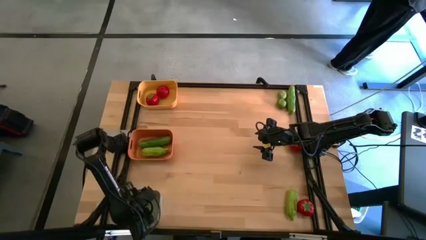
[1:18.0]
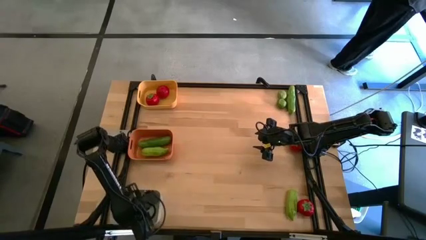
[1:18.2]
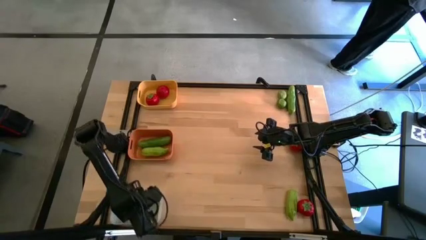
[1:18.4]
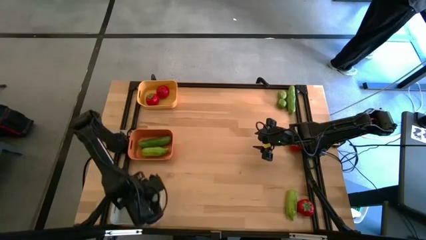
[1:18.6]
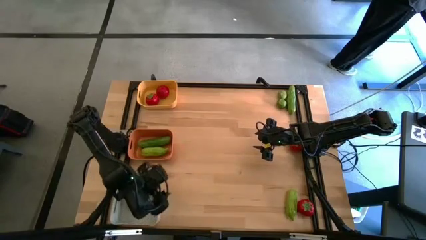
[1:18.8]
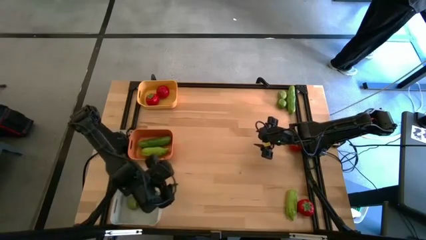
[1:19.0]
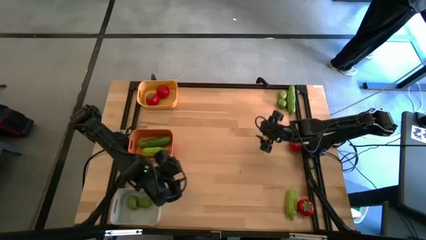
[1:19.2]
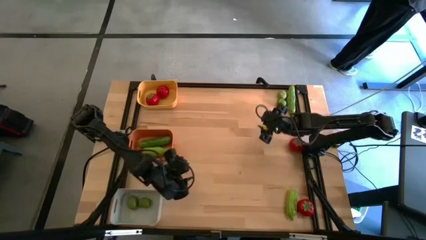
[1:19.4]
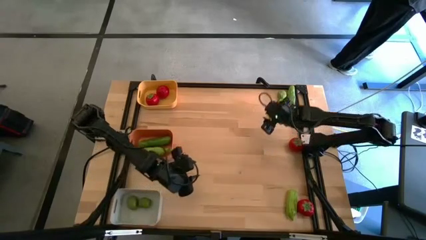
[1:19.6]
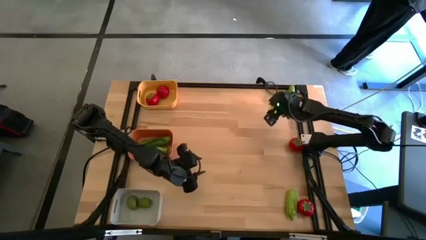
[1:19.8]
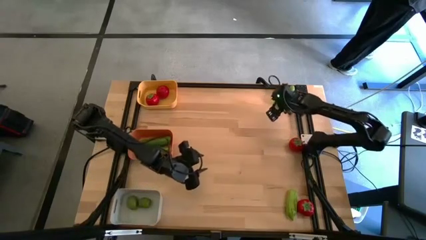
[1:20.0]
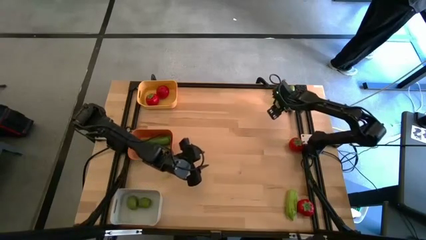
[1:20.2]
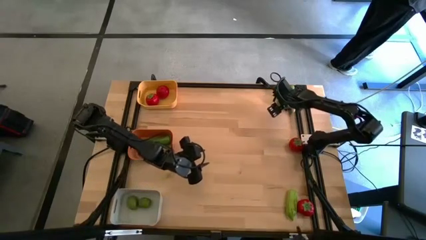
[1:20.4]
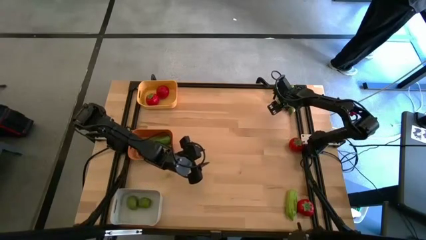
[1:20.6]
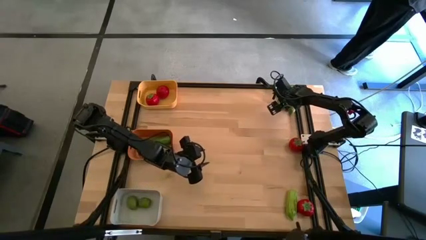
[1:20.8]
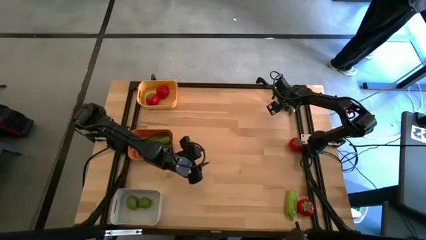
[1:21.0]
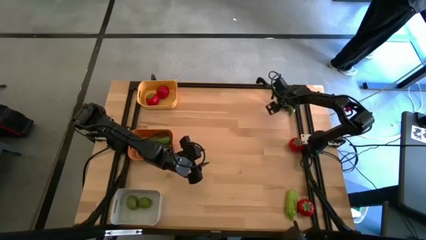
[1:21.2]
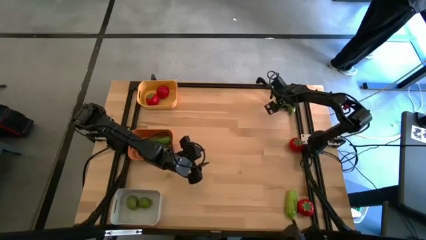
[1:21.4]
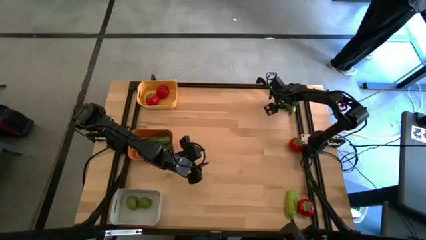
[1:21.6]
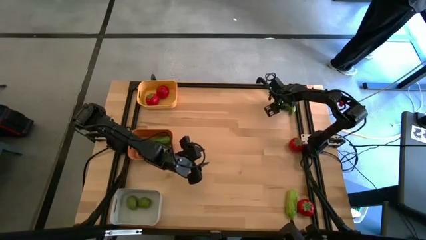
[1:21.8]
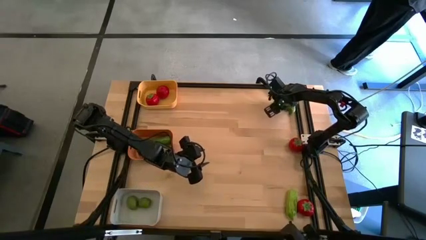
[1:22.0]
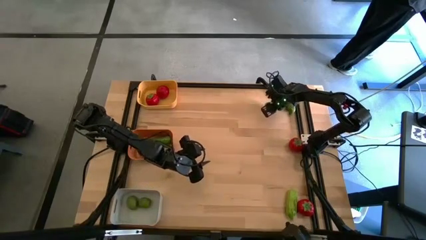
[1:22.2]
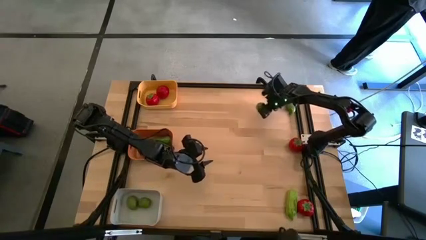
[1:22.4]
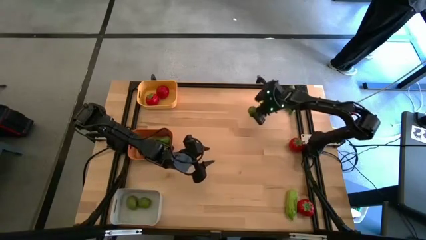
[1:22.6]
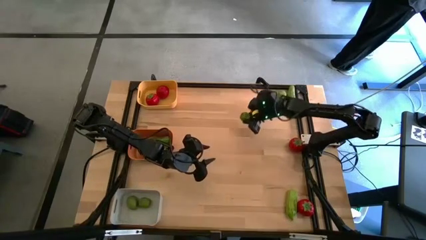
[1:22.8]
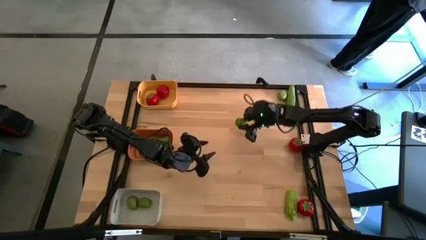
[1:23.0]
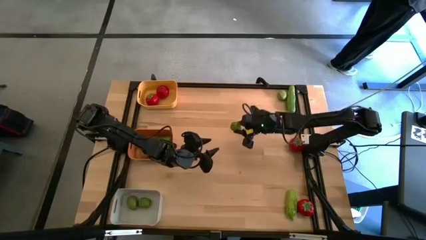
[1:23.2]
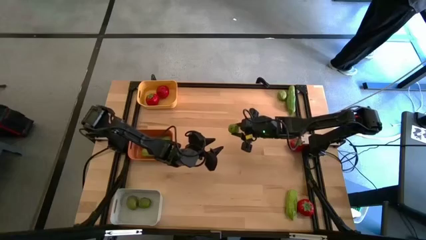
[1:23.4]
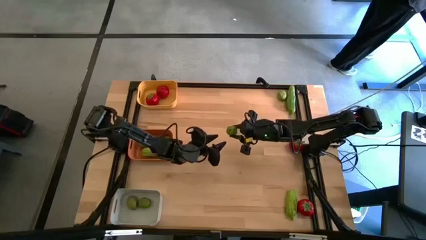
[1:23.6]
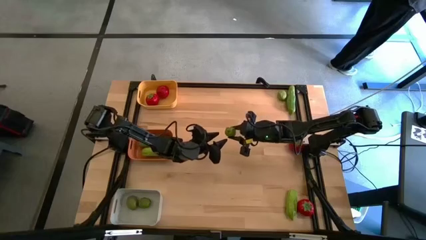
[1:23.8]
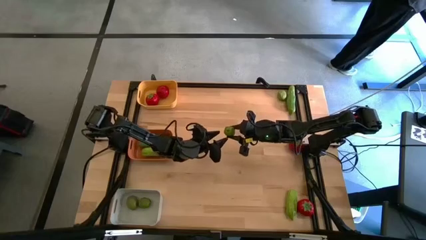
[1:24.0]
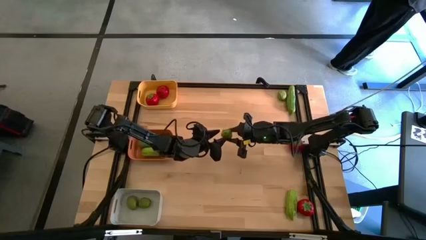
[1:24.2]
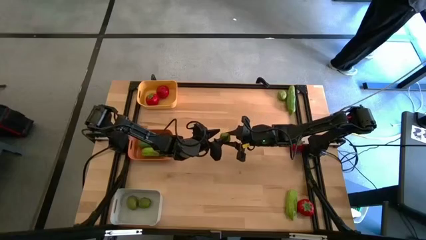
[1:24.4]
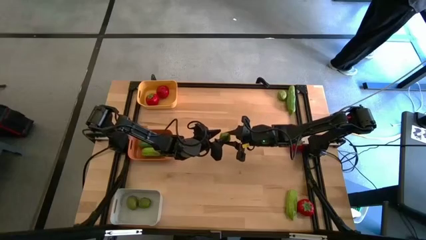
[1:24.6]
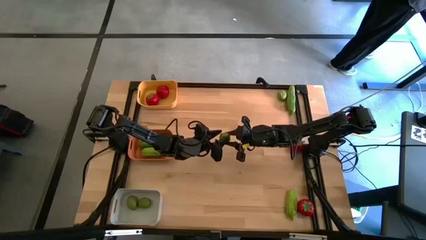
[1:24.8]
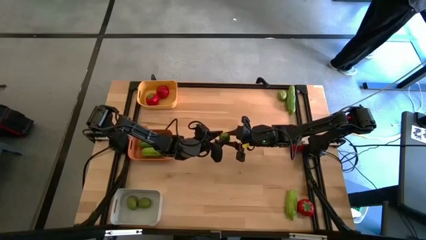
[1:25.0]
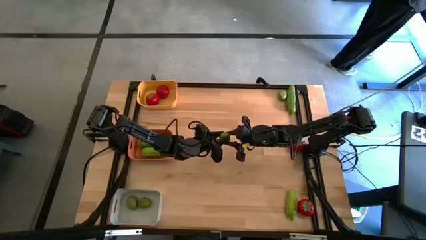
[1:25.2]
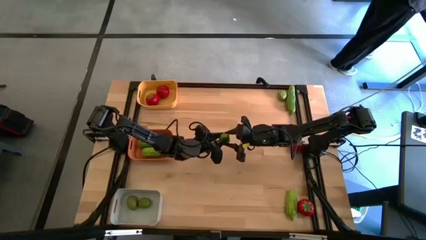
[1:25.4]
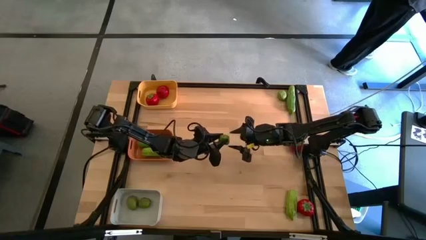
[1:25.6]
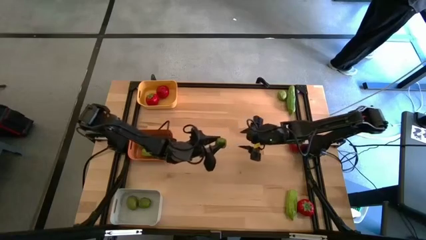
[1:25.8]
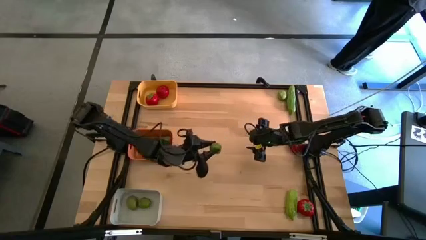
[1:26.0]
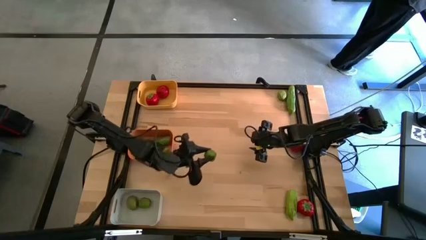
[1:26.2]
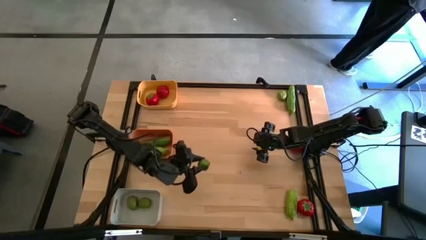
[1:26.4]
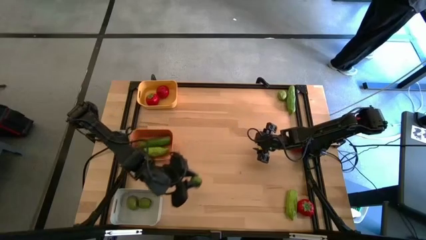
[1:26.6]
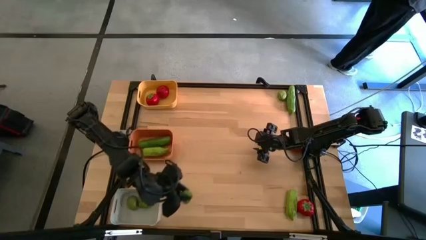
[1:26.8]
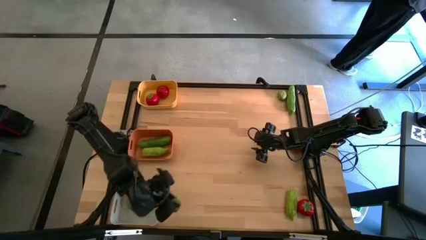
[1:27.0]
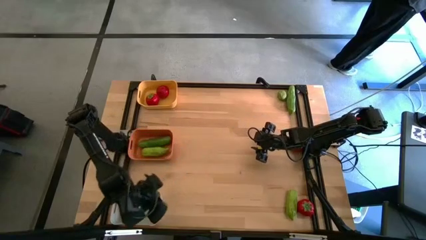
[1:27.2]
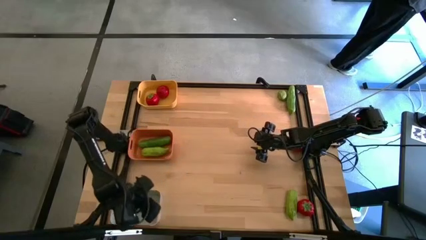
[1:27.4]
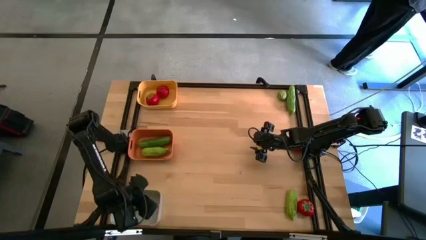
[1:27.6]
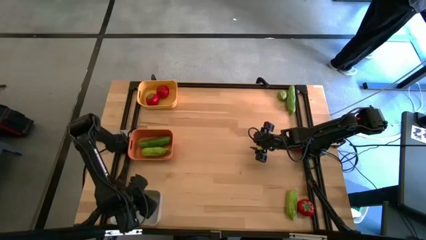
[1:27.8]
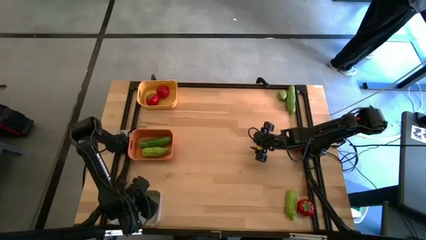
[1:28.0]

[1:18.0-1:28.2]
Task: Sort produce into baskets
Put the lime into the gray bin

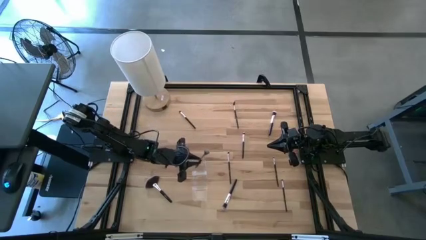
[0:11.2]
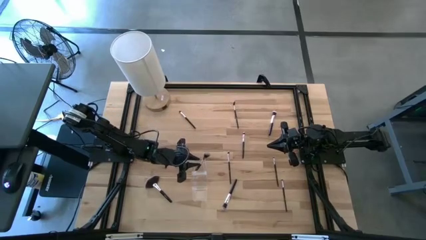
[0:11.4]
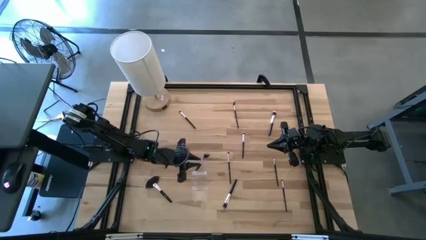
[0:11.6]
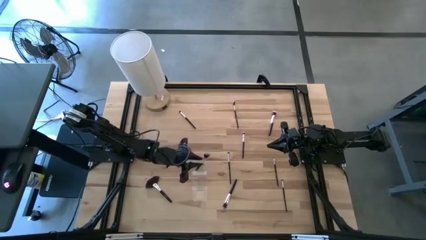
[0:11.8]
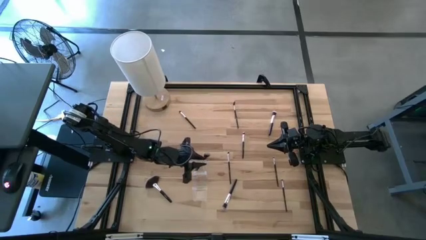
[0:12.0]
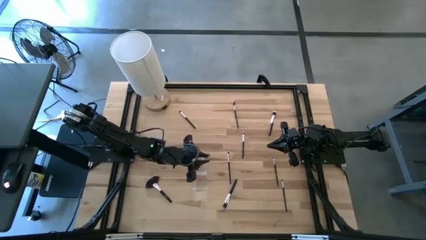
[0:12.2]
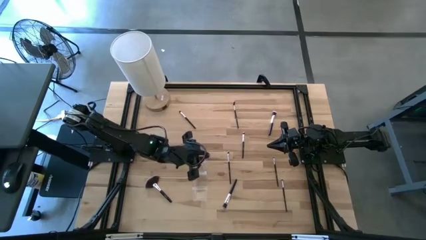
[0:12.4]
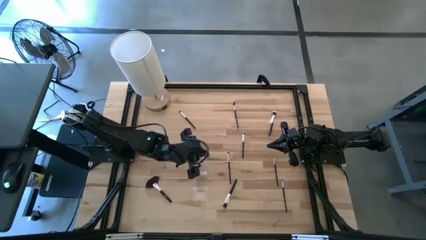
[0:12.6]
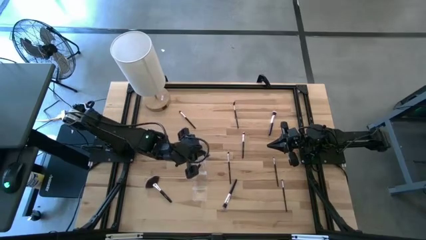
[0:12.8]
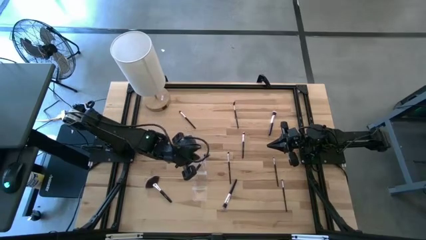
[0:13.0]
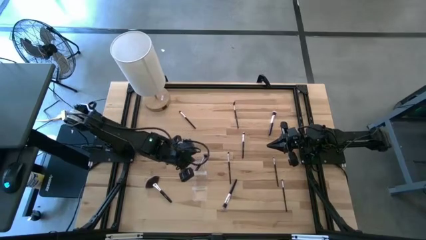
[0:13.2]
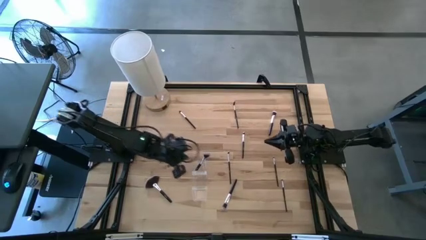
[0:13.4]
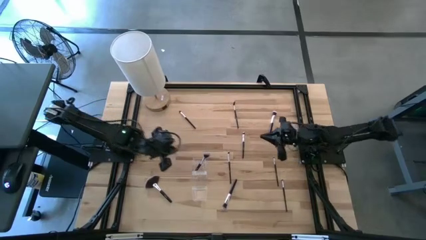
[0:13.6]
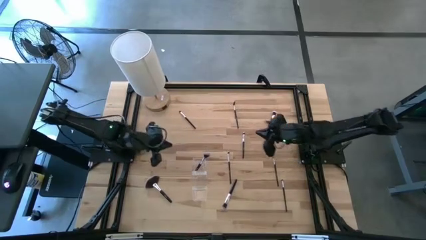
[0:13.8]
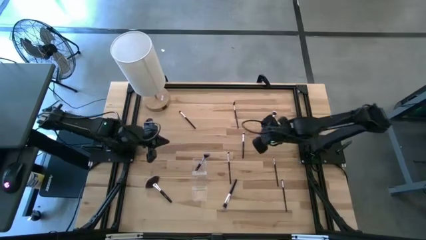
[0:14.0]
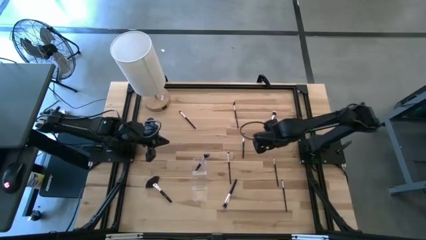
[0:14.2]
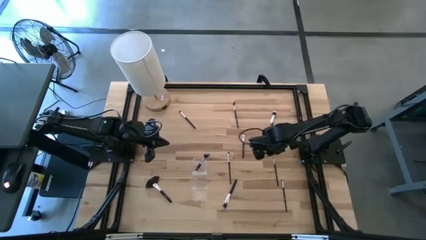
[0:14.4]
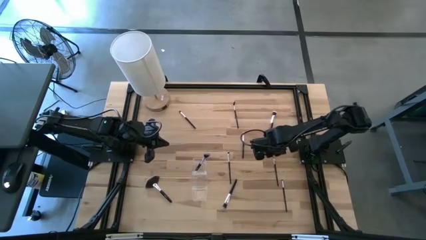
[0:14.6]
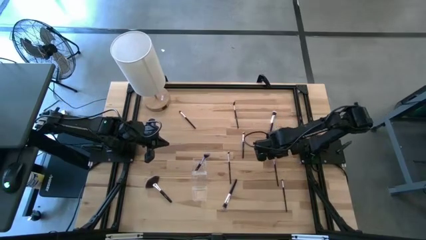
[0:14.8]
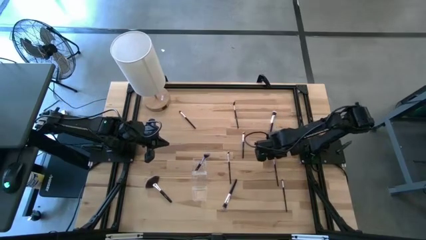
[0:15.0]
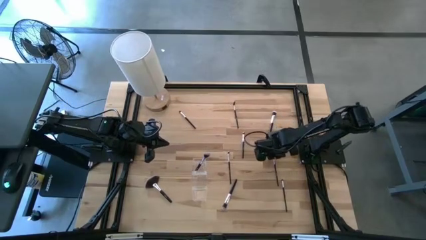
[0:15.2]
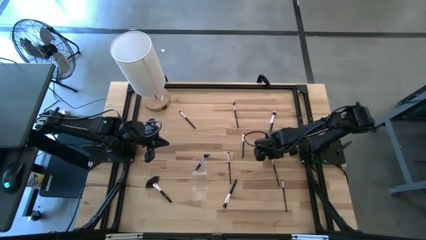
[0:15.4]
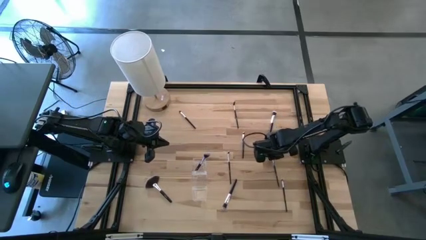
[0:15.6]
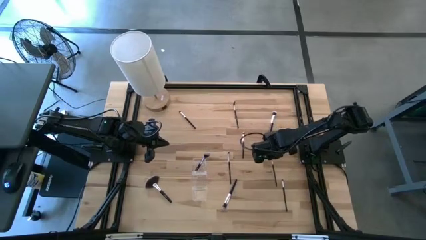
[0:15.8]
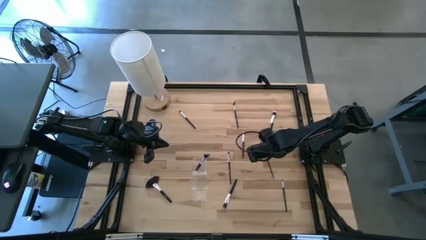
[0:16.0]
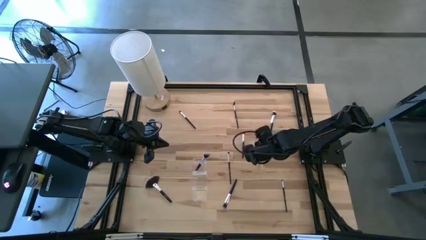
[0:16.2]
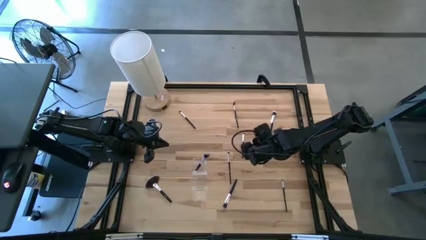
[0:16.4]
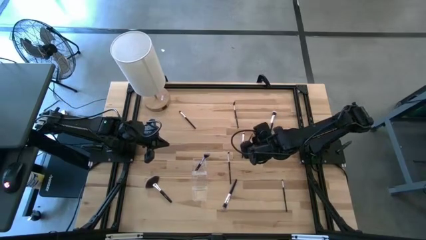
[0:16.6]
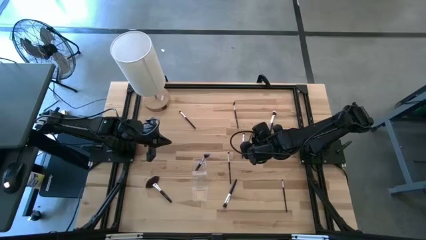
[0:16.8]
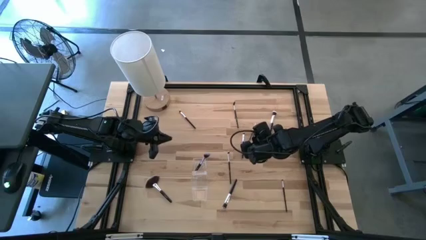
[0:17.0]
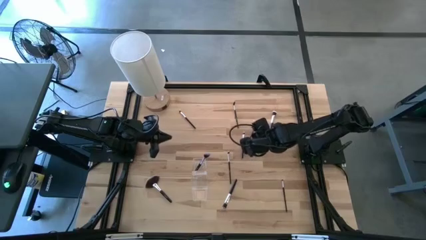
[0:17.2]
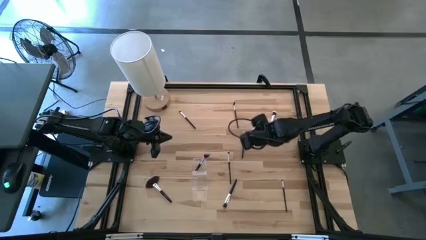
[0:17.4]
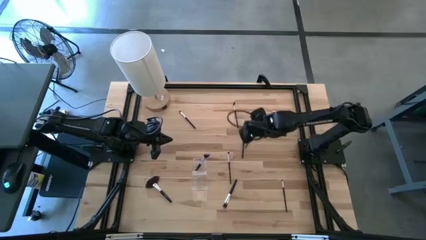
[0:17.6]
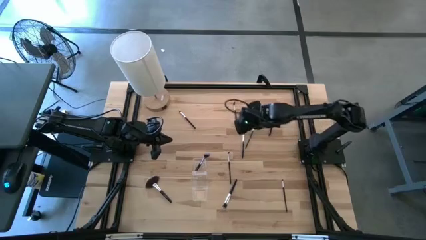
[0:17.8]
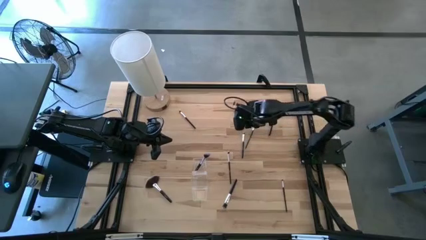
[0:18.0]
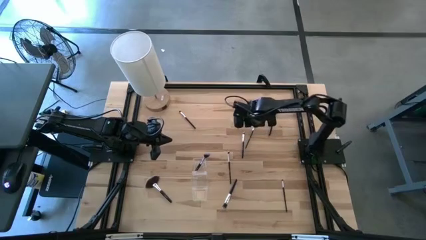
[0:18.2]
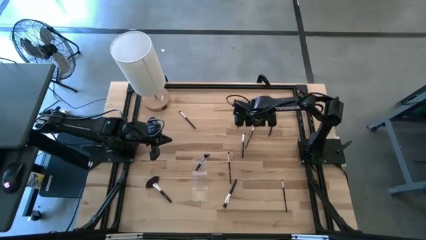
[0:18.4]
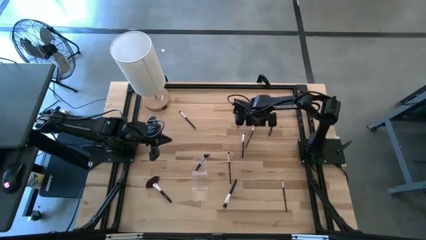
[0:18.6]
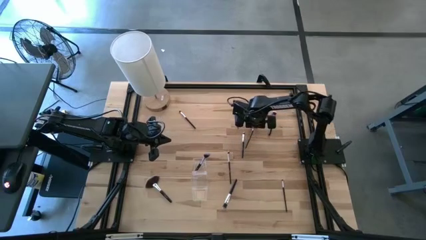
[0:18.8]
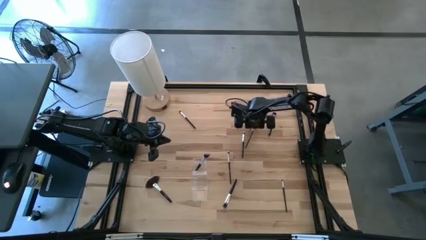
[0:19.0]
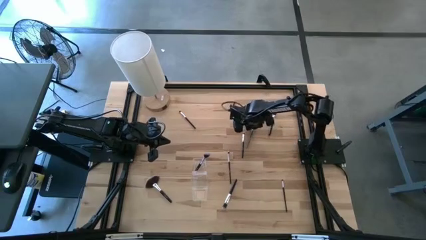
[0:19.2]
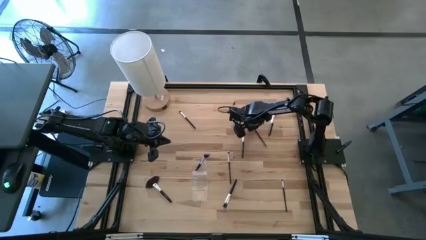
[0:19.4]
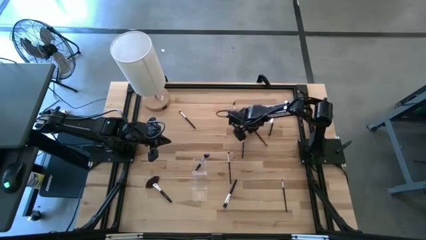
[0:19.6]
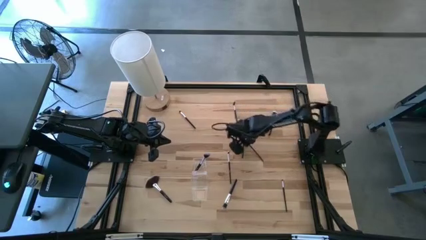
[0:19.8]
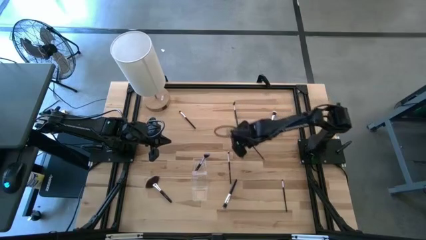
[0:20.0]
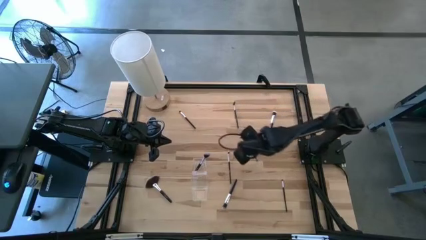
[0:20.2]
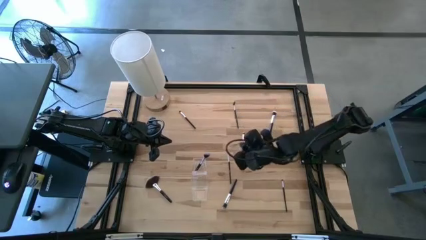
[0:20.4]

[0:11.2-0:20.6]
Task: Put items in baskets/containers
Put the foundation brush into the transparent organizer
